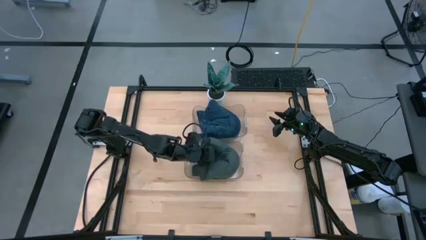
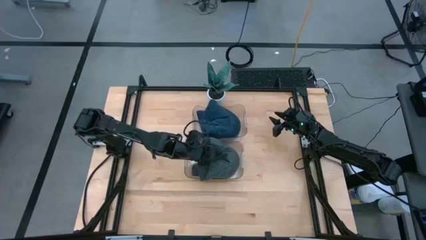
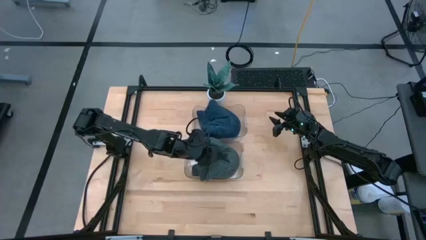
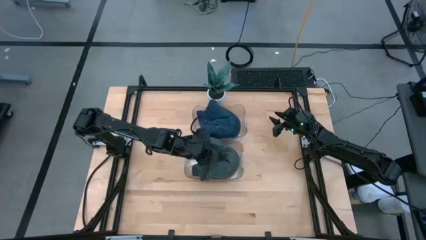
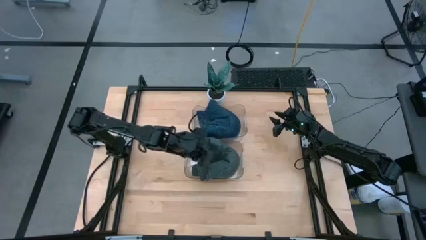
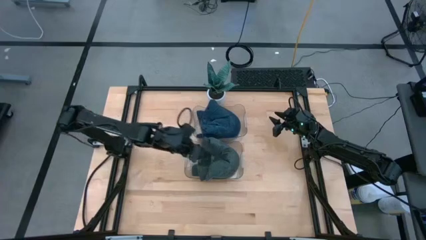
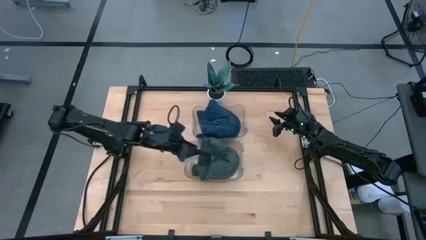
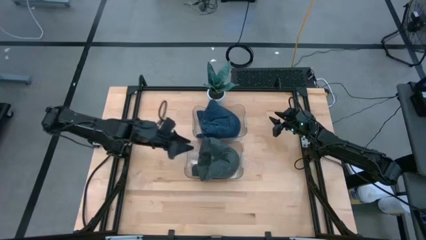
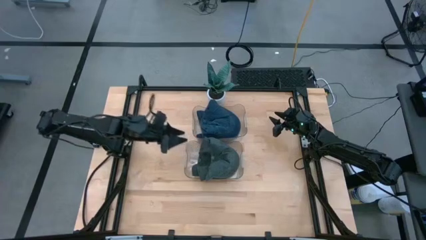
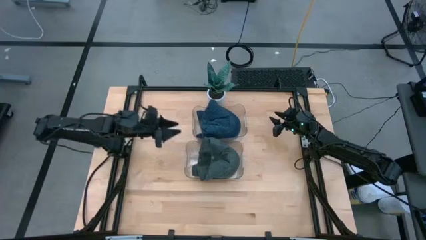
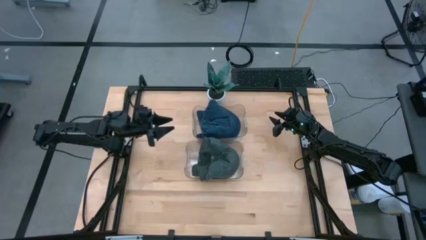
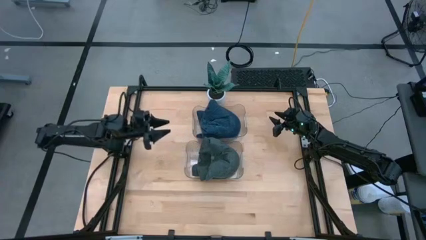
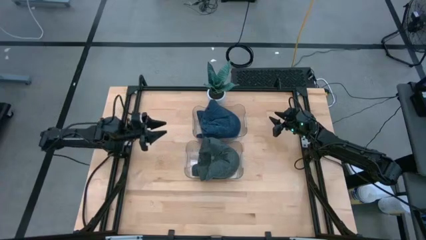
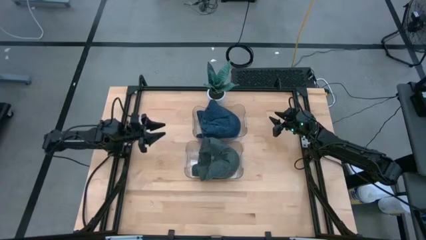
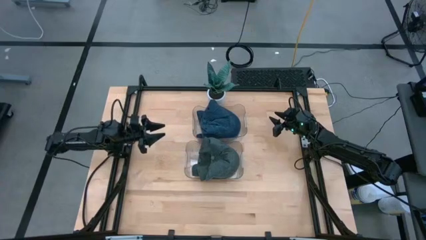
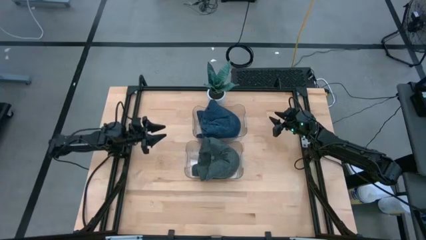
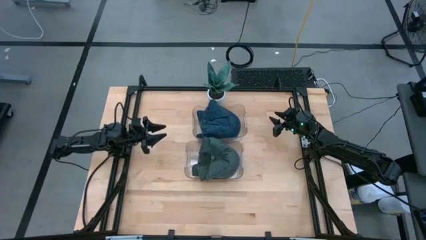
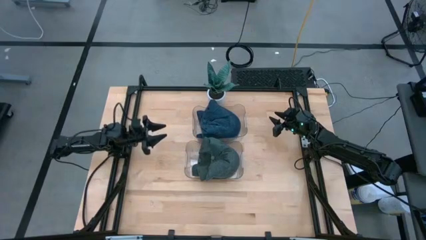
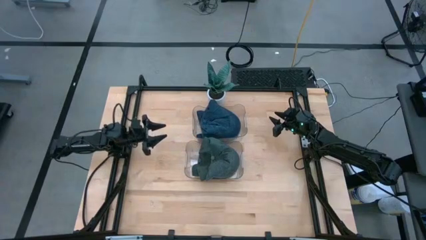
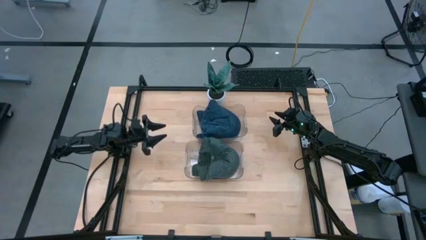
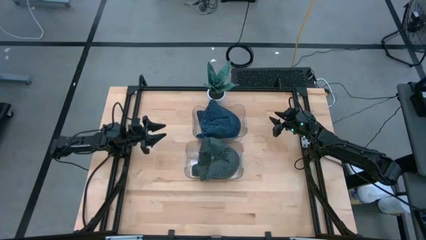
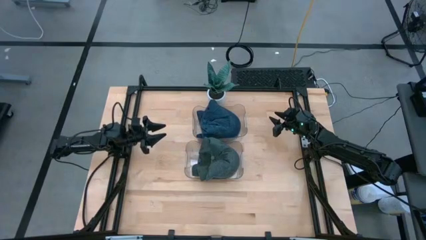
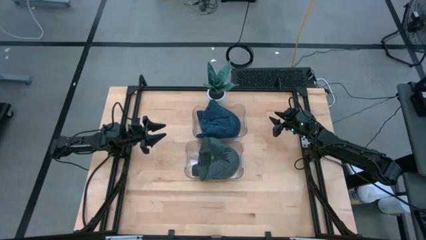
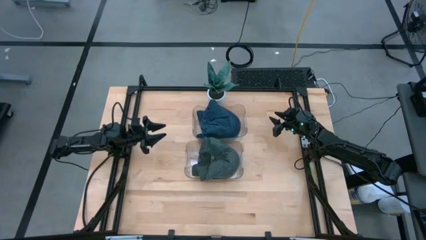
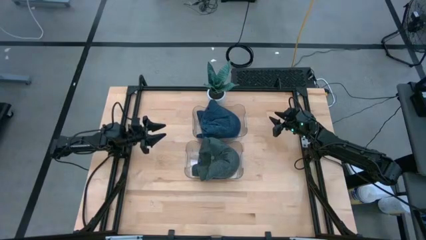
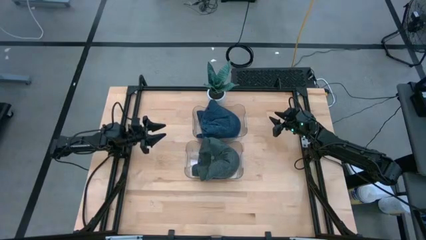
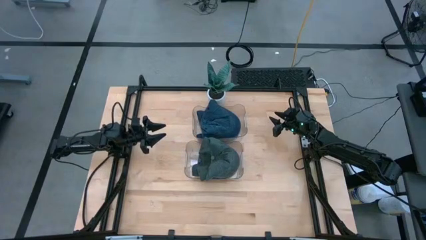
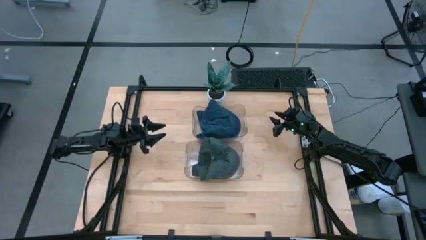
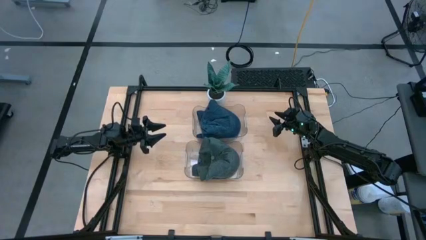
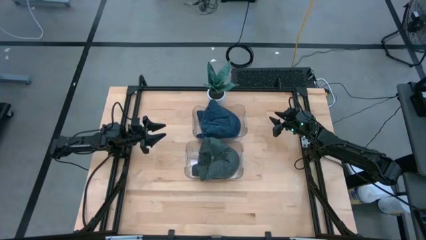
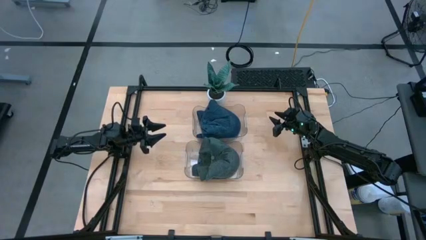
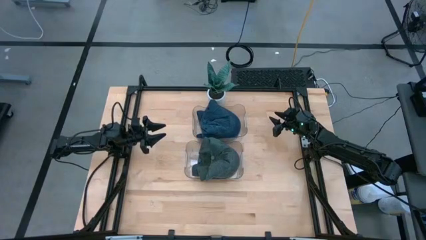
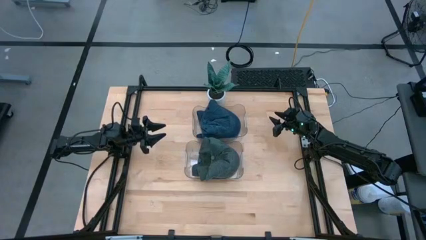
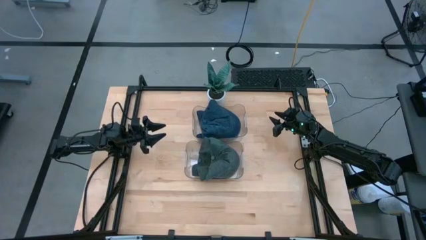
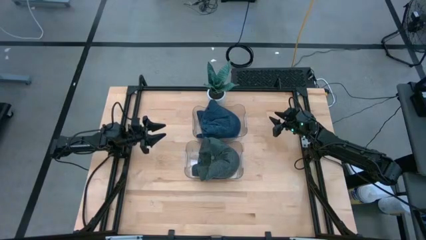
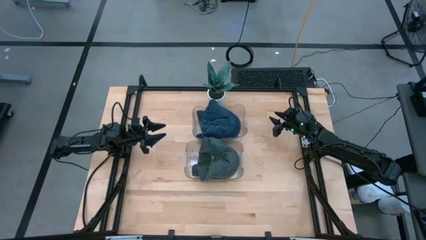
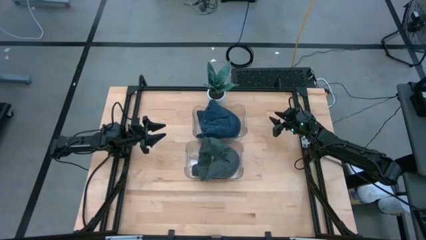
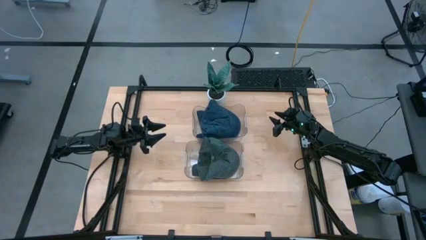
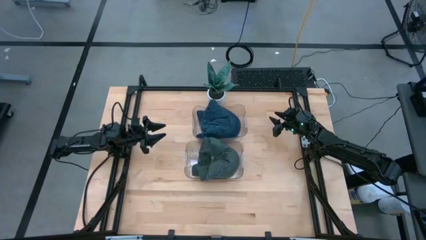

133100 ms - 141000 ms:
Task: Pick & Place hat
Return to Home Position

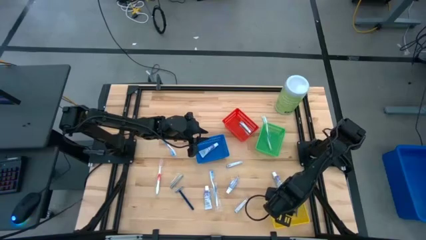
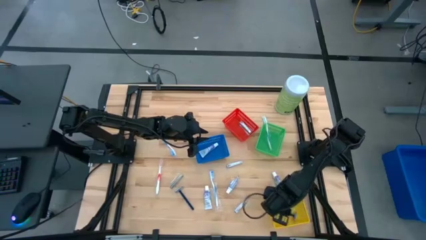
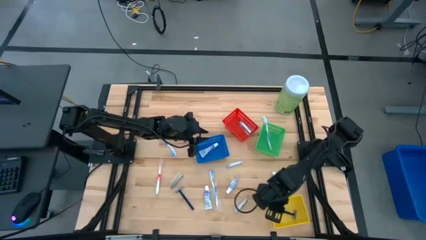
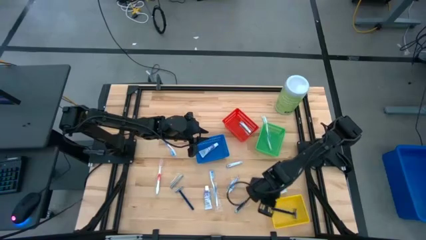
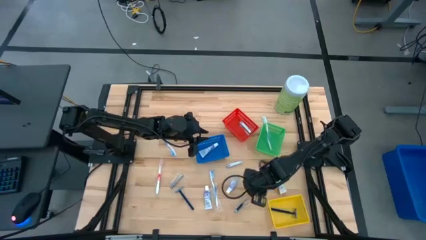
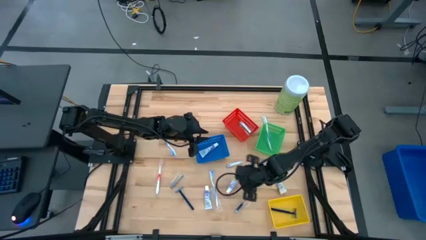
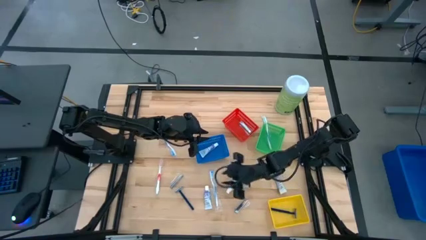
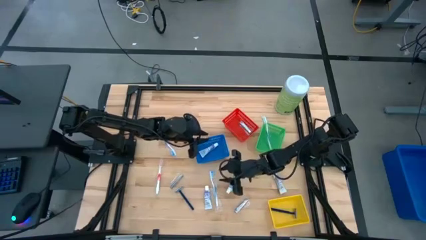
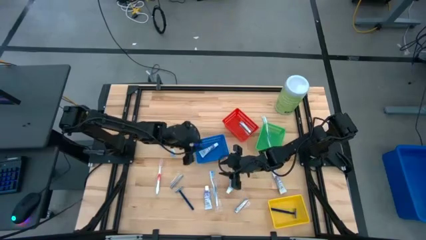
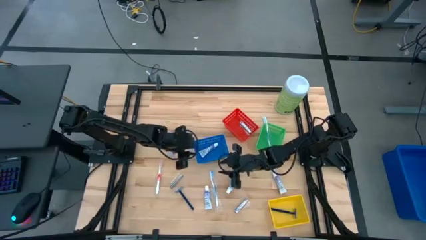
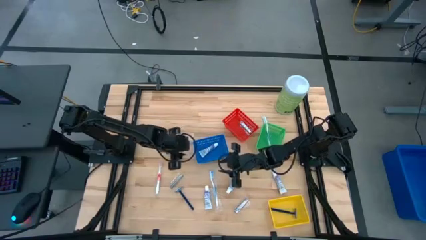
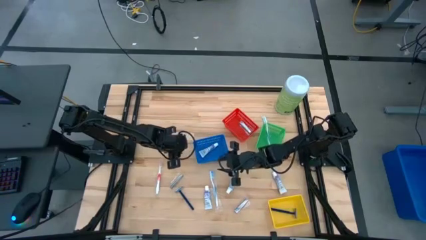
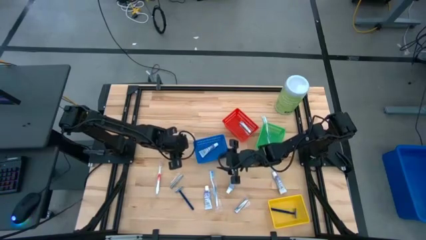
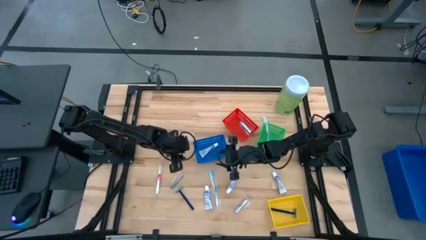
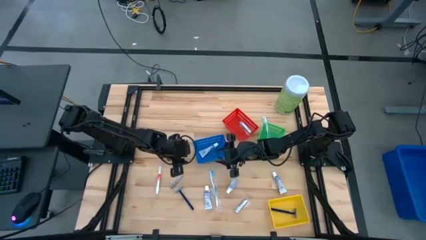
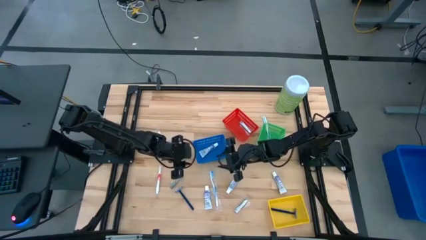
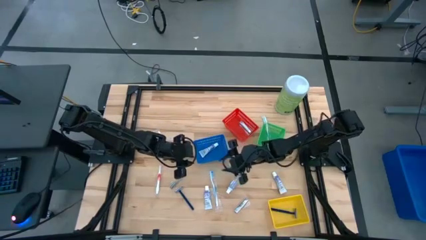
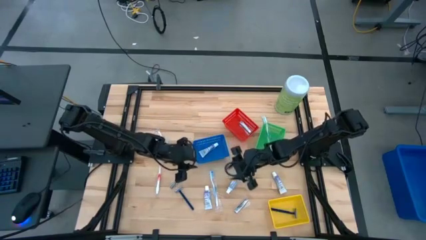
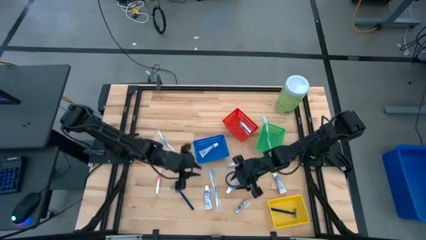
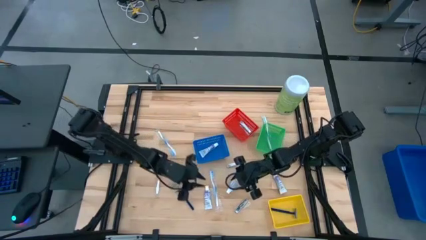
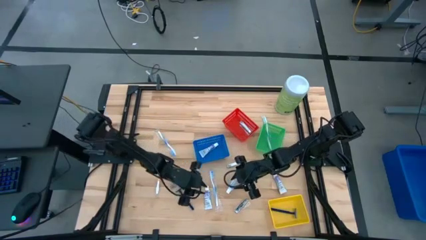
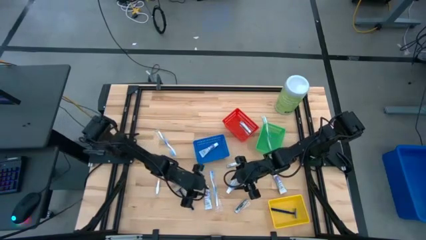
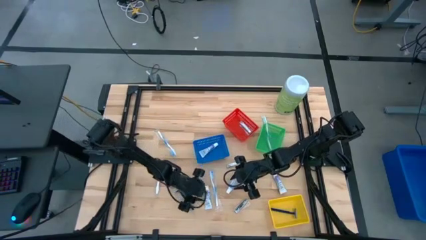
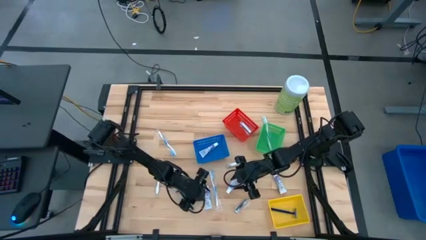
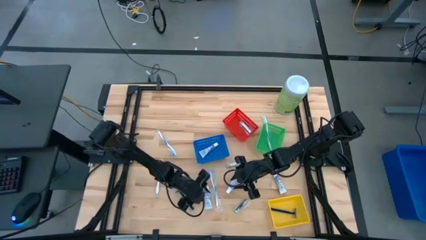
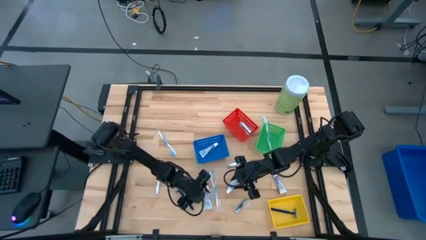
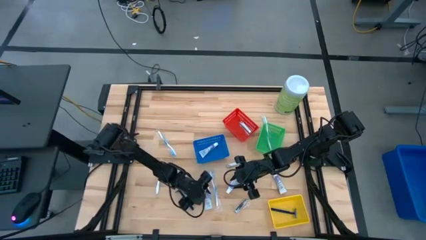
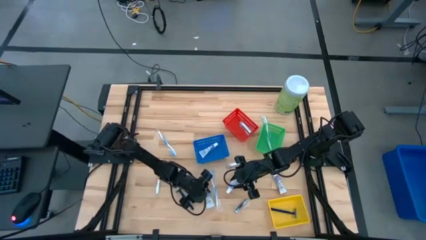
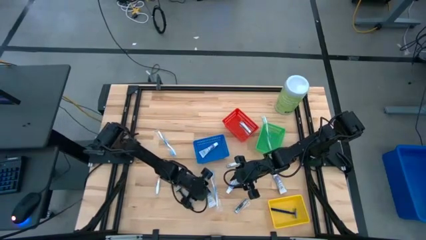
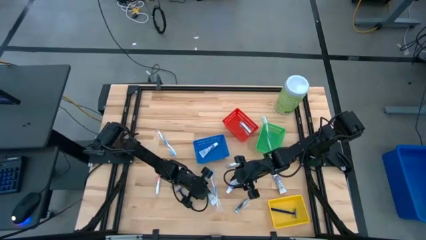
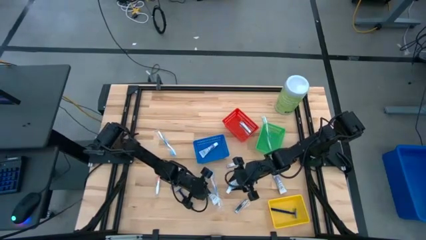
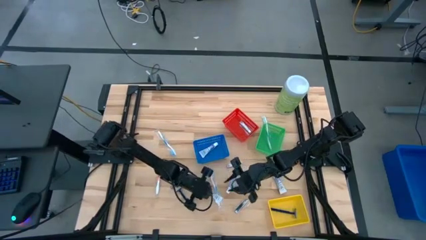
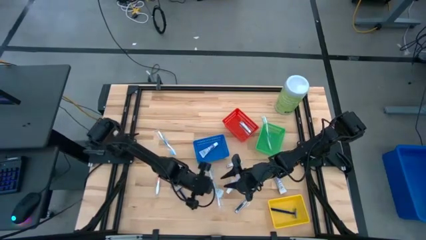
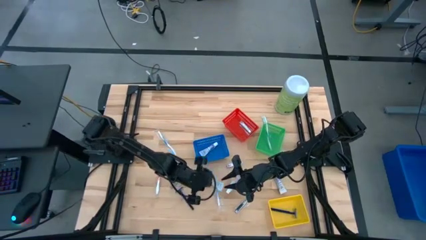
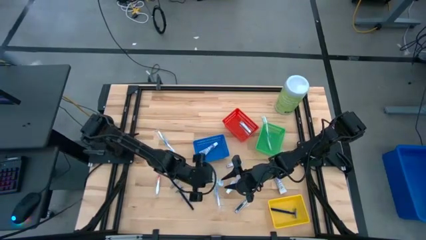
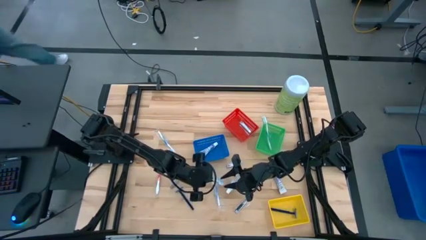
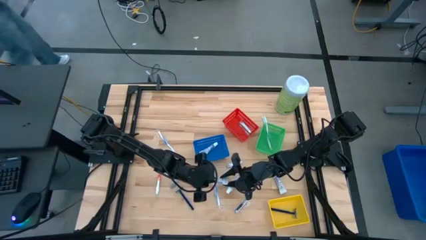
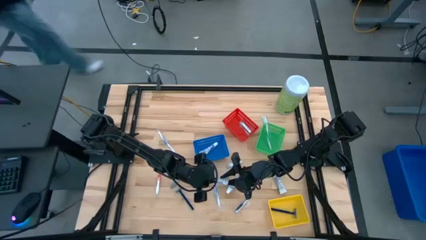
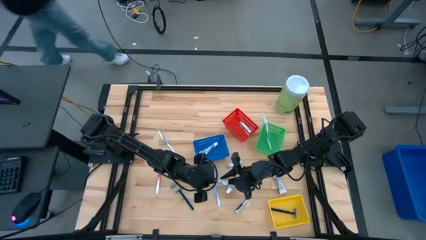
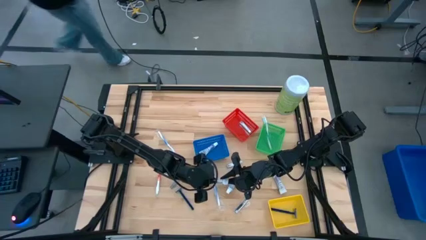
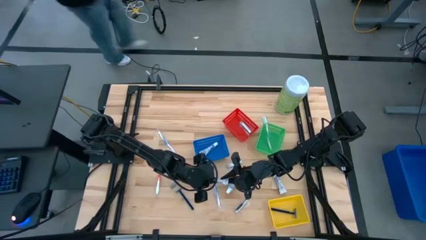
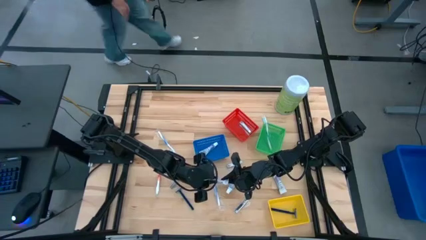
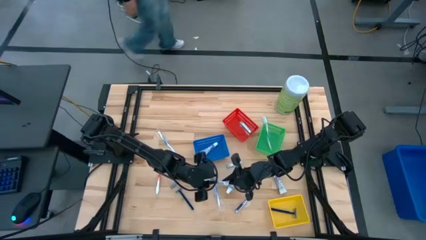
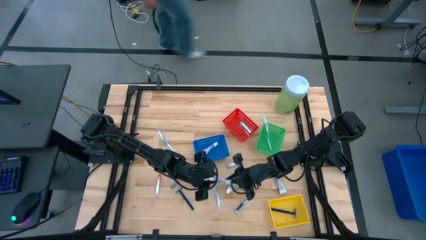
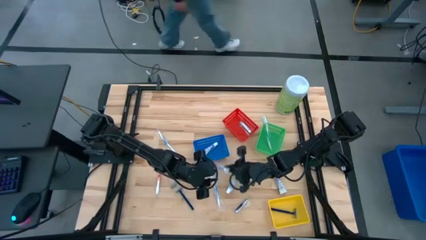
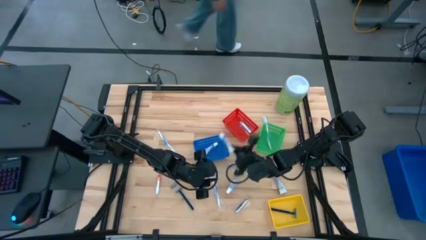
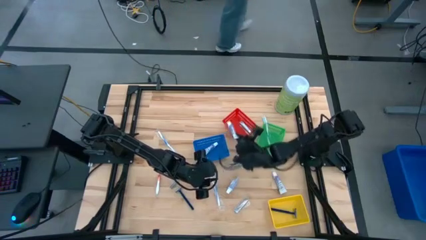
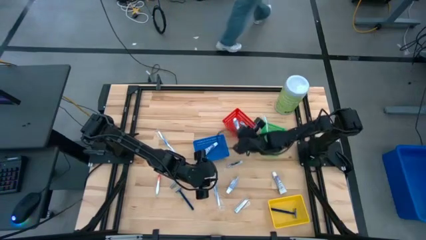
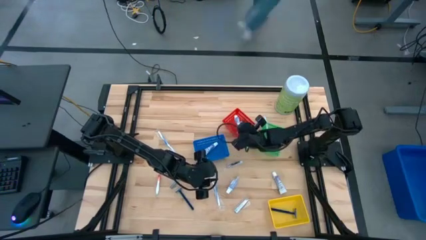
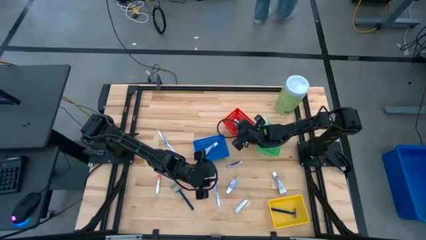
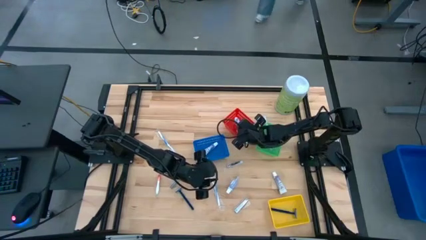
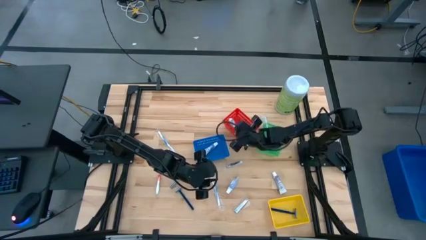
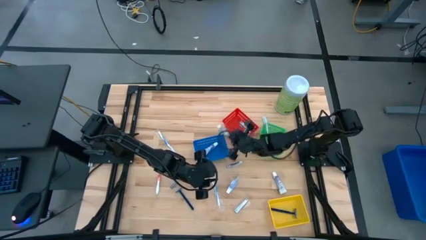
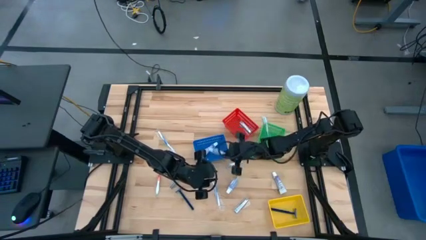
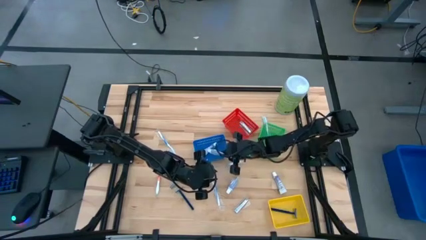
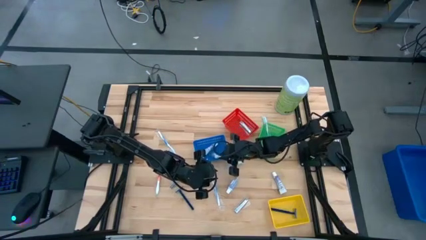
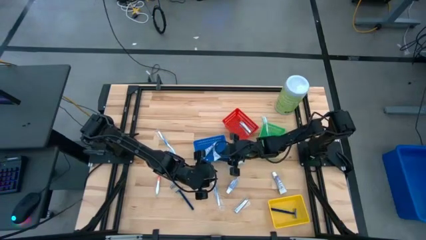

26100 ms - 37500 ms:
Task: Pick & Place Travel size toiletries
Put the white toothpaste into the blue bin
